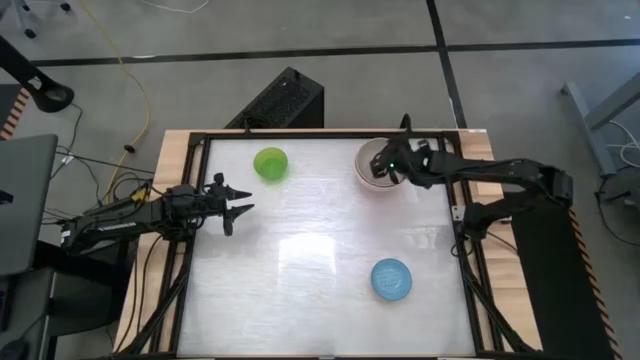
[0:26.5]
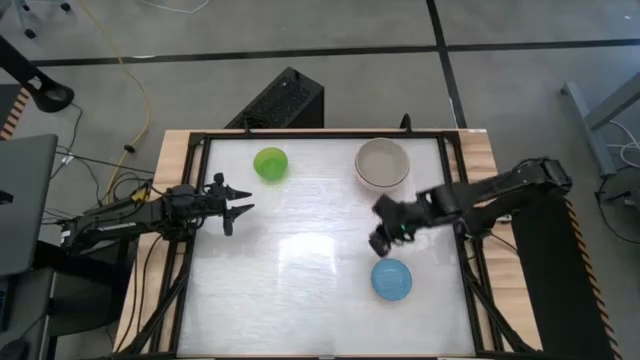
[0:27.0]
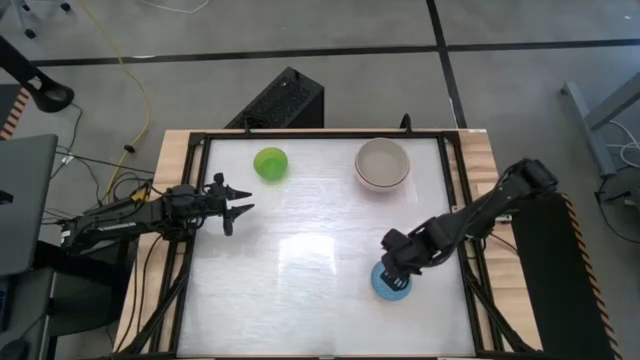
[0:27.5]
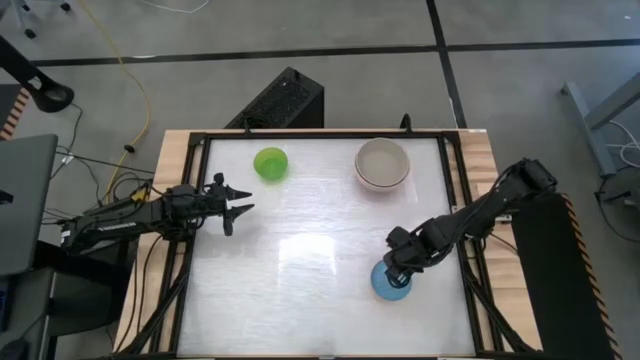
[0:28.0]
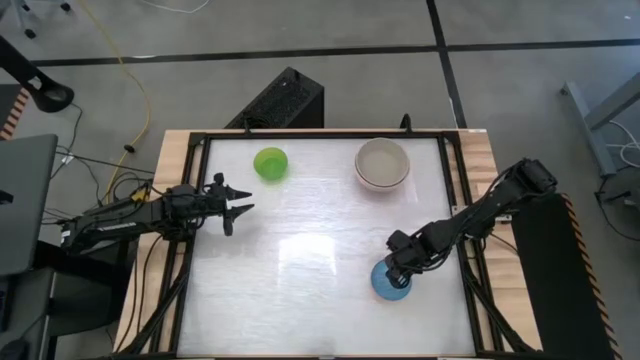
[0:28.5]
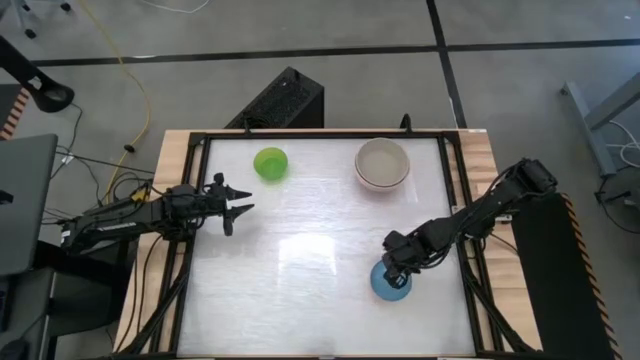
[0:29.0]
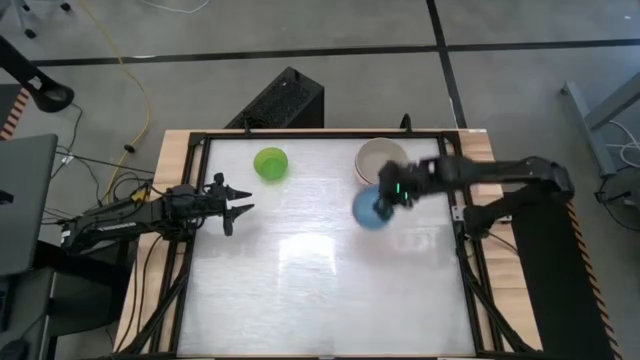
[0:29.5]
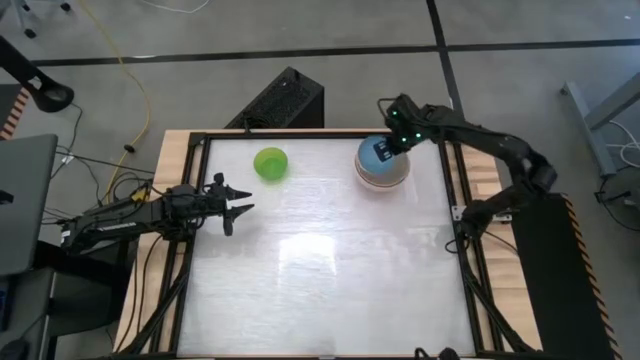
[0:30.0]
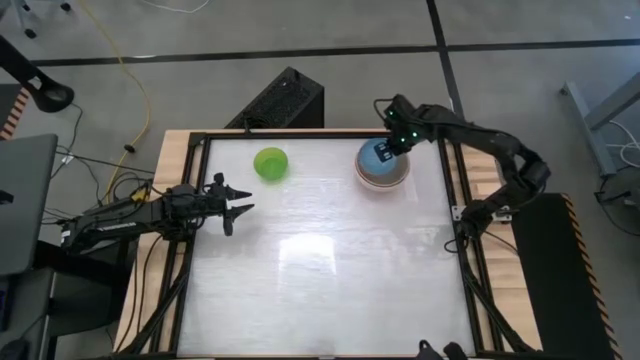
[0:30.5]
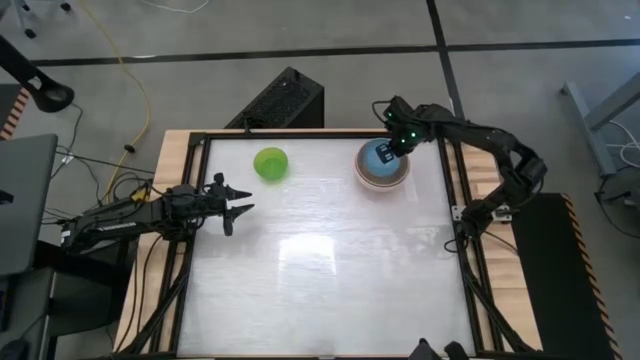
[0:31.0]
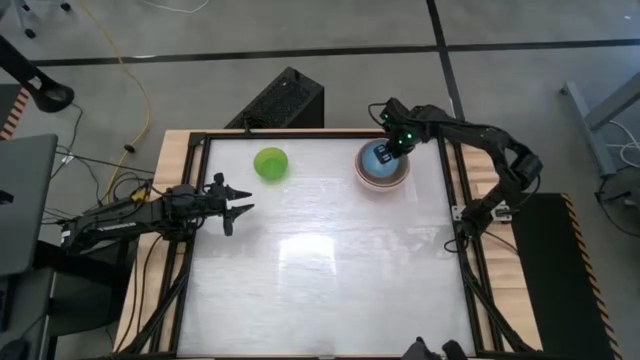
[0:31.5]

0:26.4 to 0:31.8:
Stack the blue bowl on top of the gray bowl

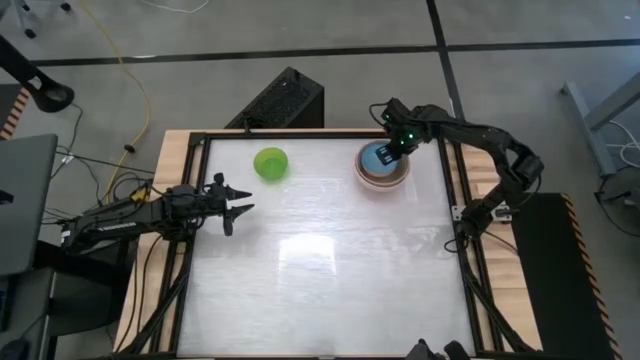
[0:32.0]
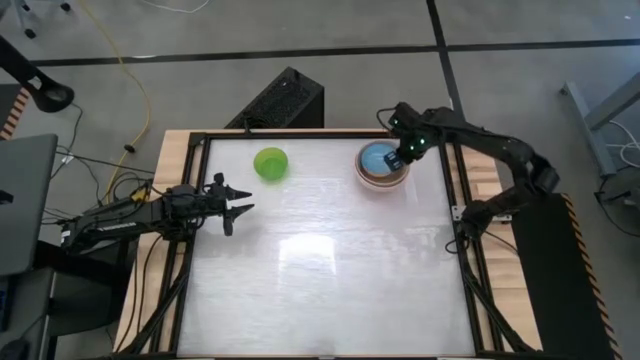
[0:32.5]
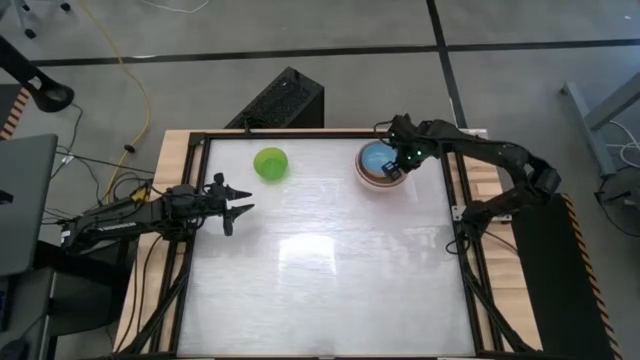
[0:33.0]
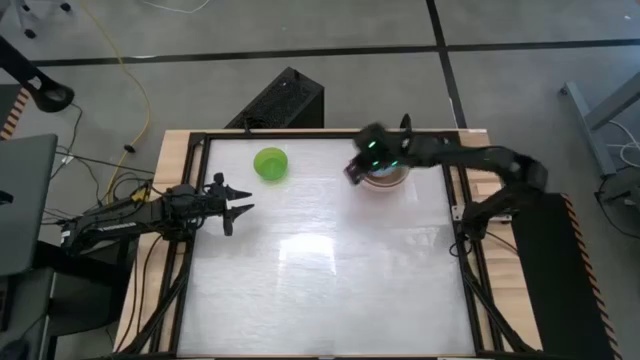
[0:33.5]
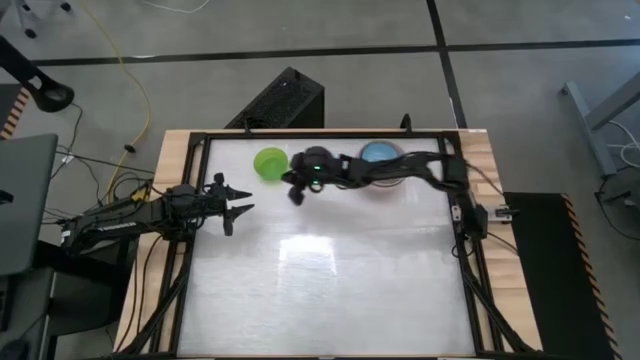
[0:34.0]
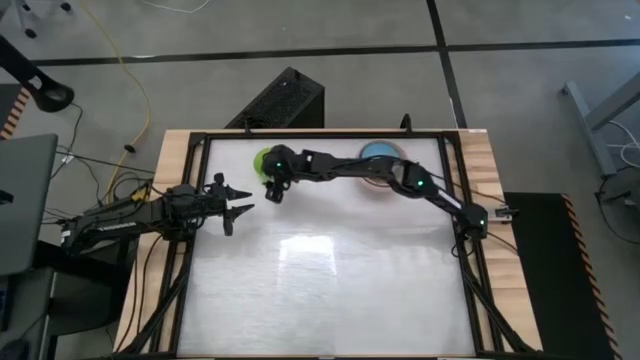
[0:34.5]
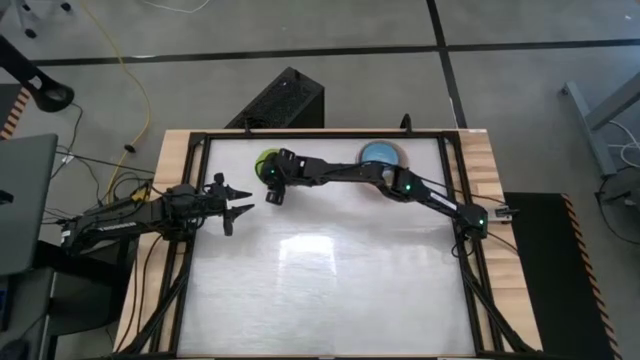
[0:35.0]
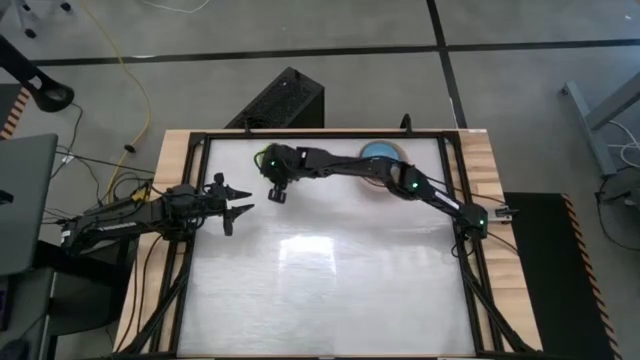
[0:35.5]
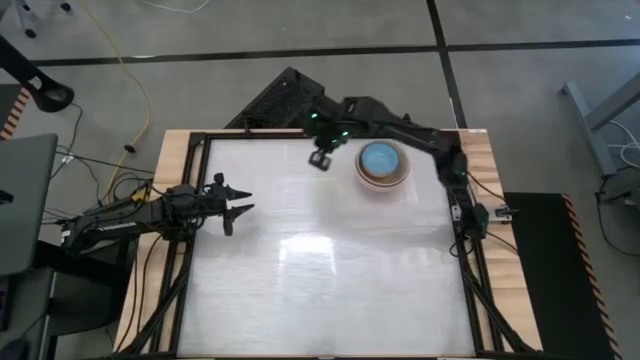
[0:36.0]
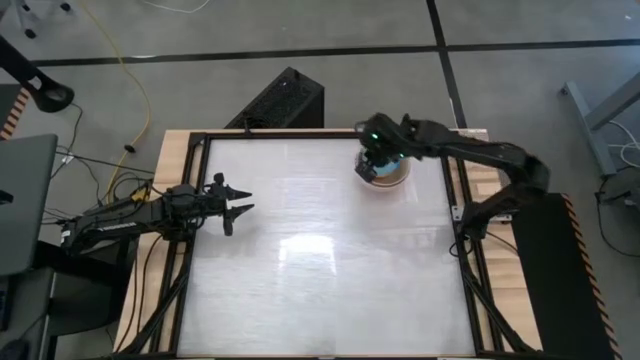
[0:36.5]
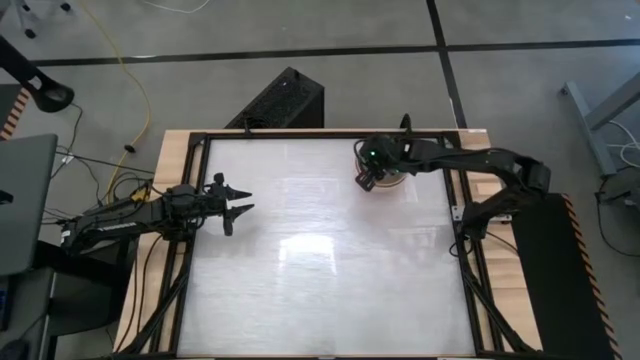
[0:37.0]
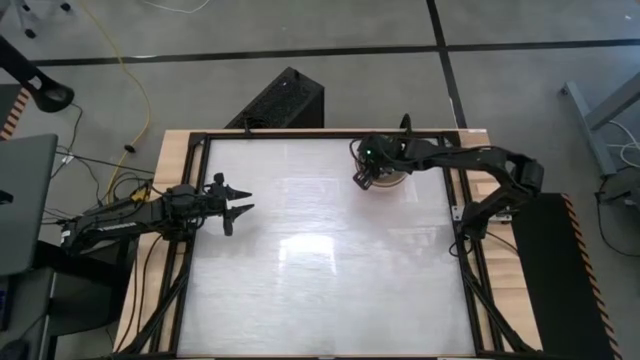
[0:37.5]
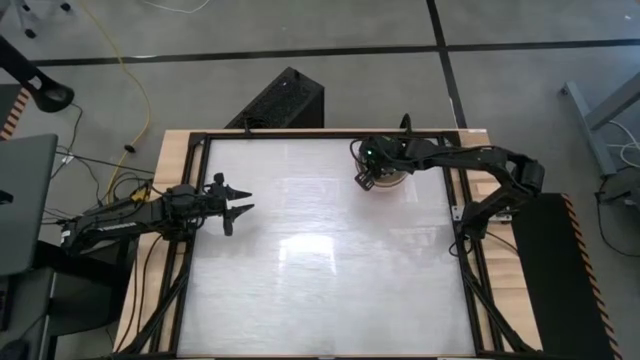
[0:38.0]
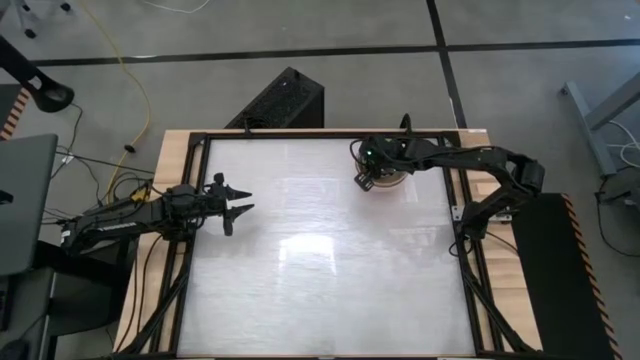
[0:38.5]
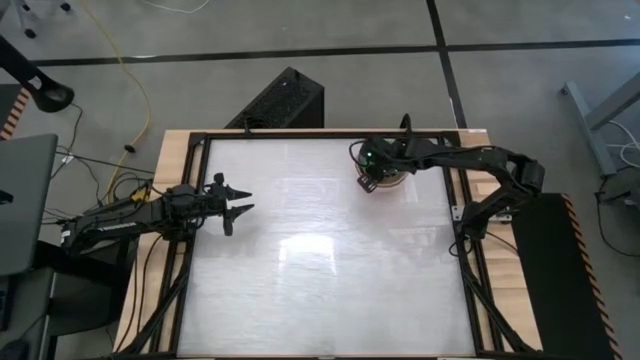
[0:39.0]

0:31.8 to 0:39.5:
Stack the green bowl on top of the blue bowl

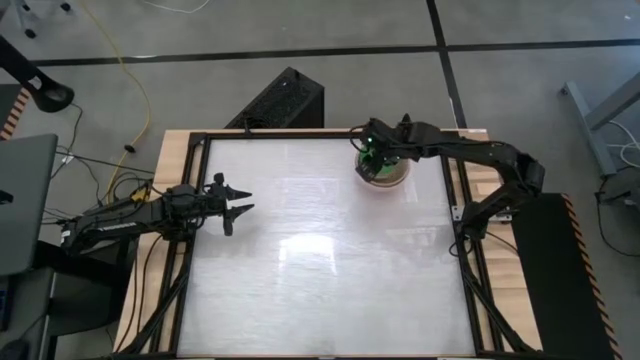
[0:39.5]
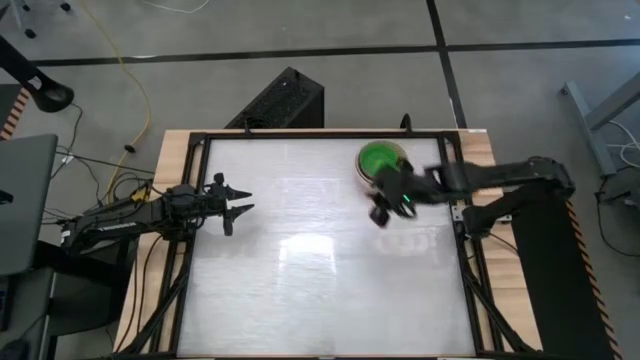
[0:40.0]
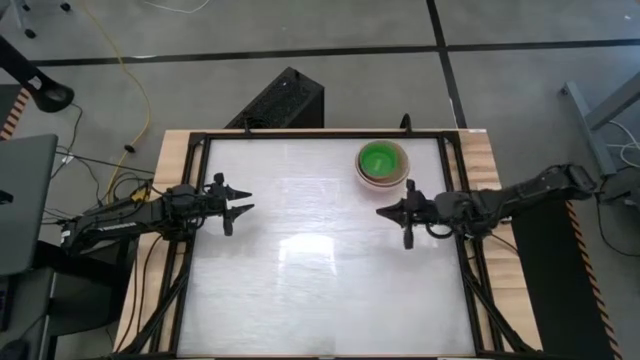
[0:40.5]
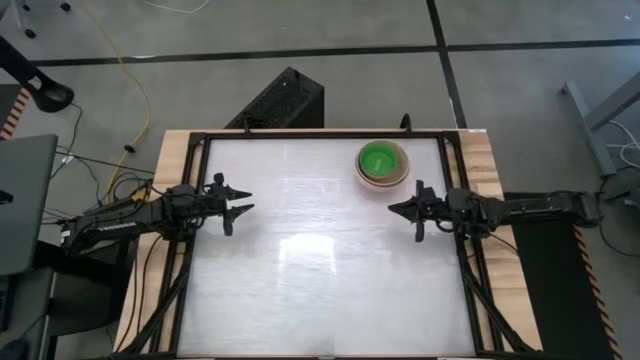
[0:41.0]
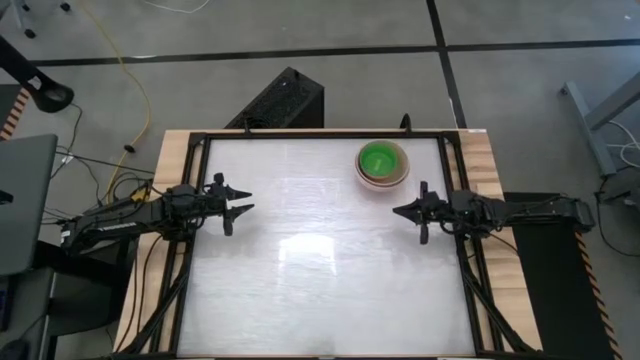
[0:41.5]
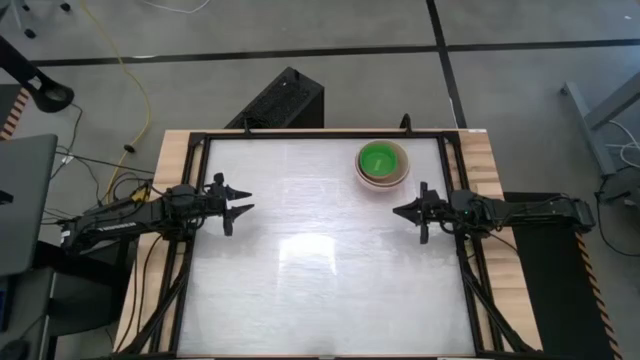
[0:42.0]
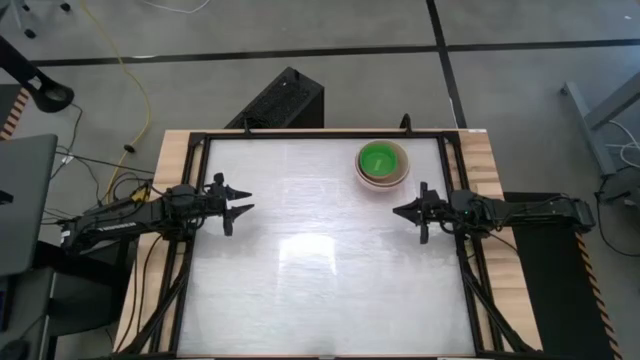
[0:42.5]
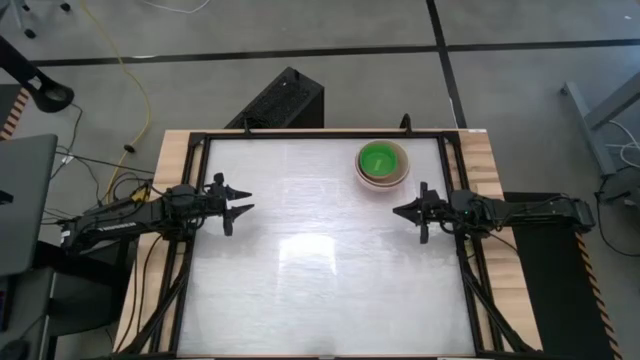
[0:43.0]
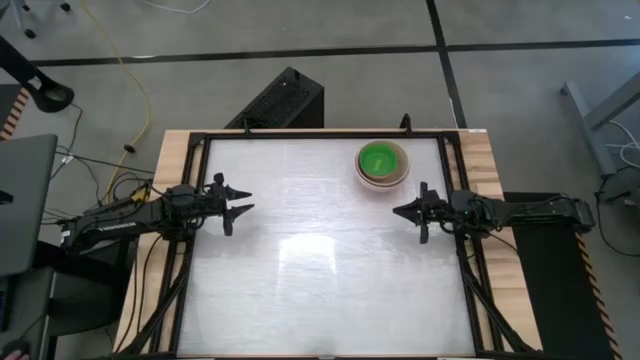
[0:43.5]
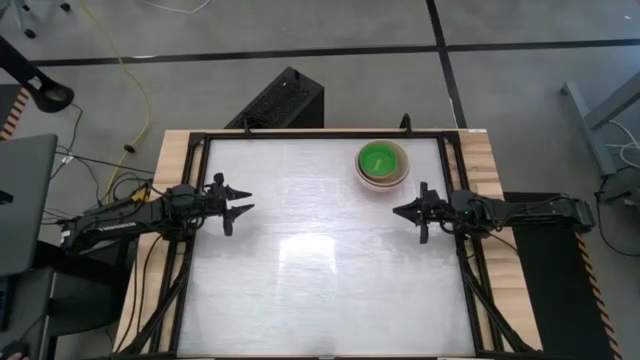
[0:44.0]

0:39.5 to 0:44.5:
Return to Home Position
